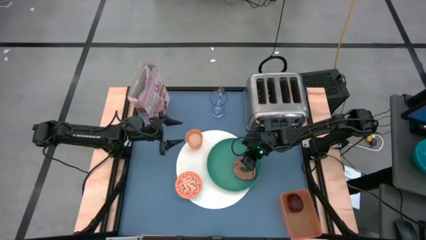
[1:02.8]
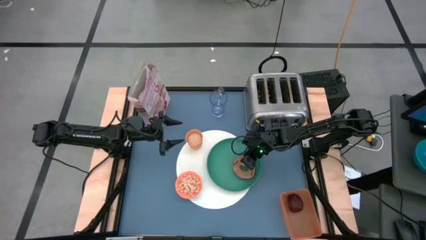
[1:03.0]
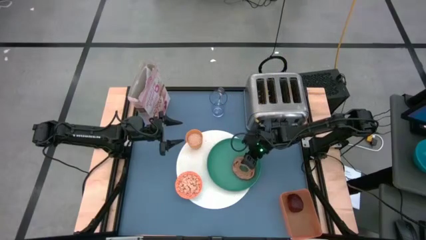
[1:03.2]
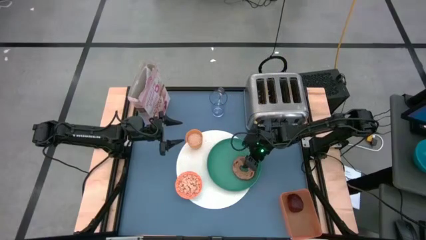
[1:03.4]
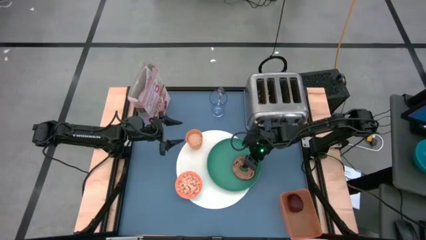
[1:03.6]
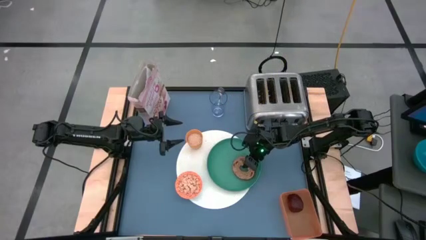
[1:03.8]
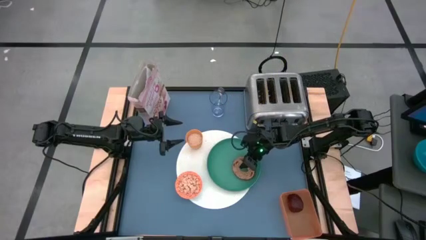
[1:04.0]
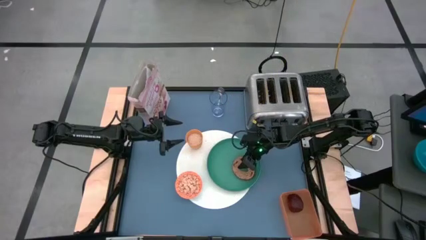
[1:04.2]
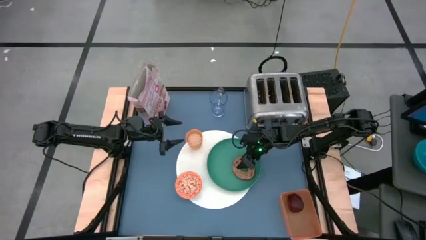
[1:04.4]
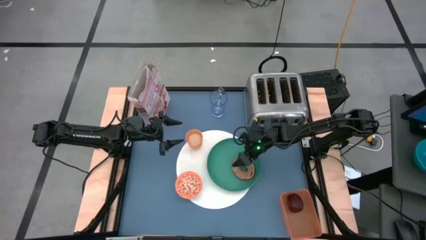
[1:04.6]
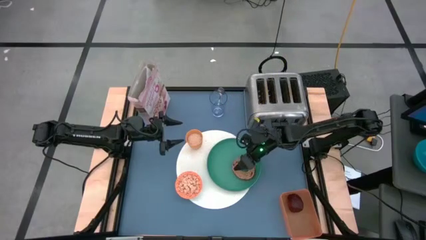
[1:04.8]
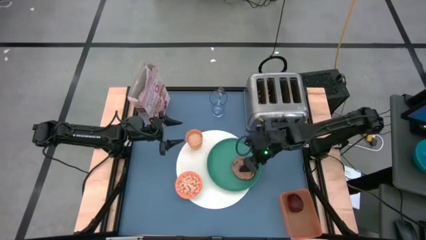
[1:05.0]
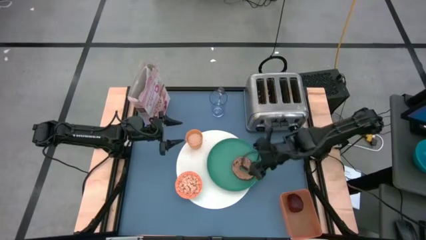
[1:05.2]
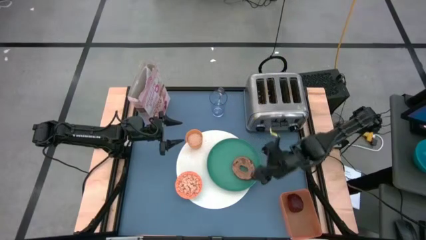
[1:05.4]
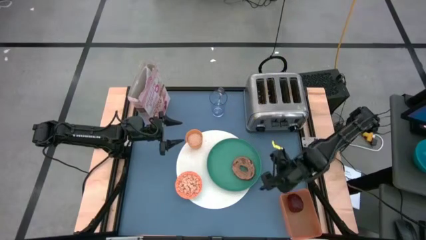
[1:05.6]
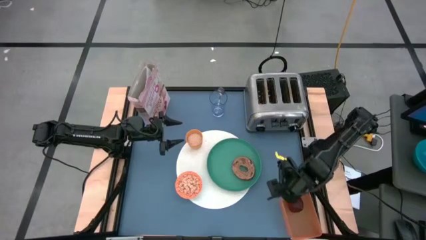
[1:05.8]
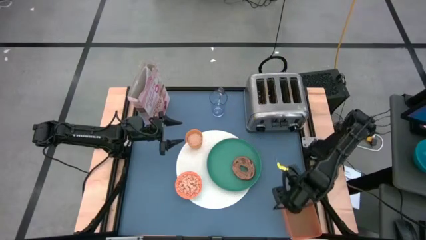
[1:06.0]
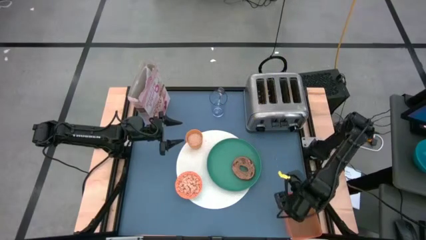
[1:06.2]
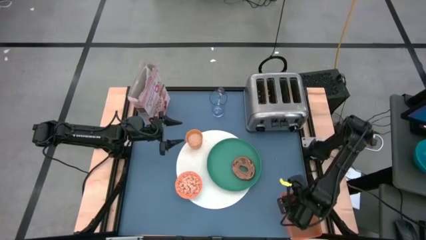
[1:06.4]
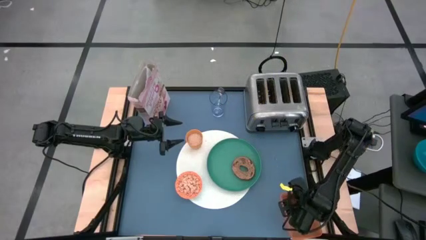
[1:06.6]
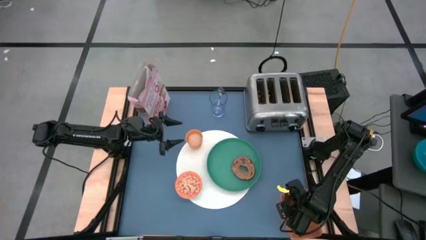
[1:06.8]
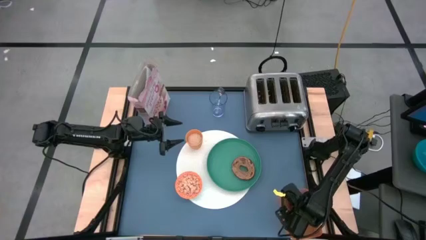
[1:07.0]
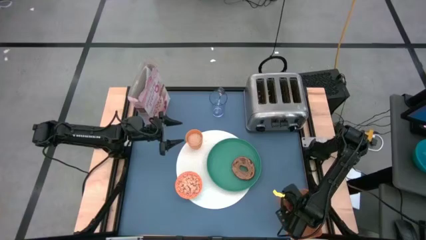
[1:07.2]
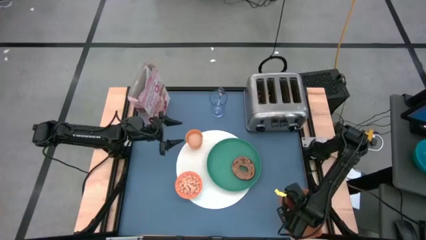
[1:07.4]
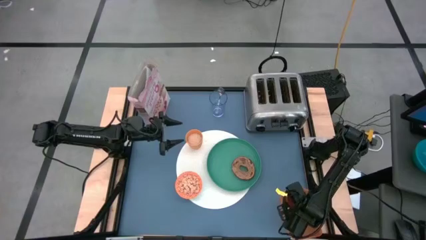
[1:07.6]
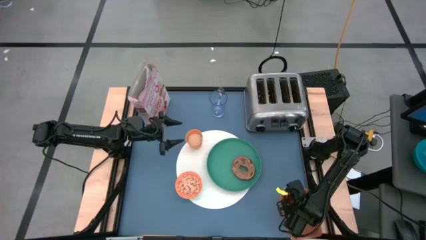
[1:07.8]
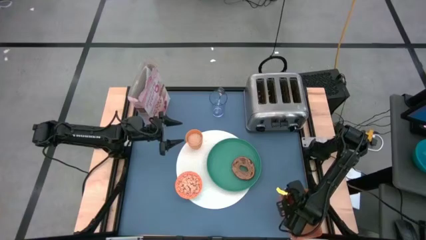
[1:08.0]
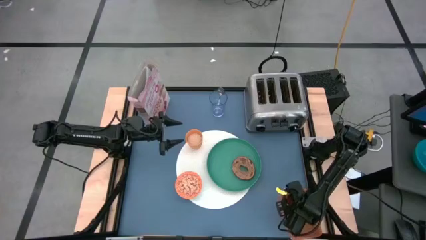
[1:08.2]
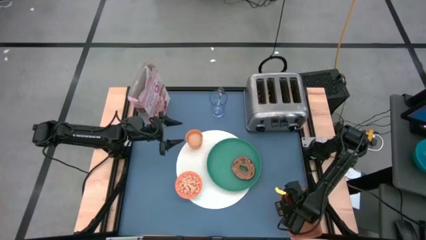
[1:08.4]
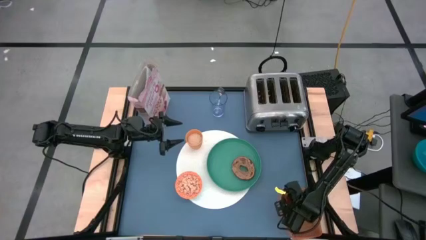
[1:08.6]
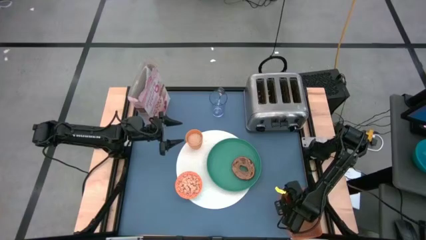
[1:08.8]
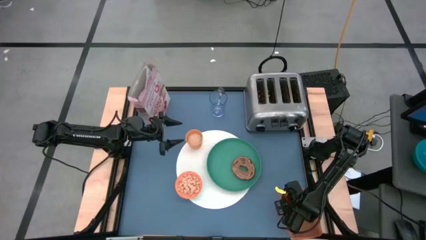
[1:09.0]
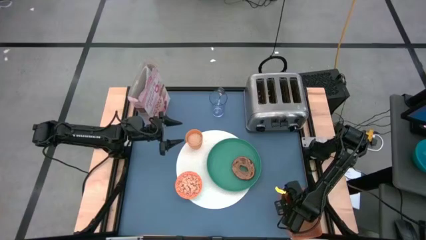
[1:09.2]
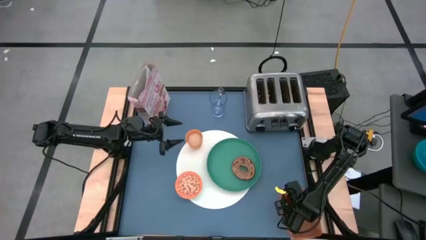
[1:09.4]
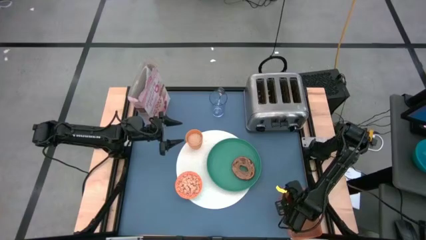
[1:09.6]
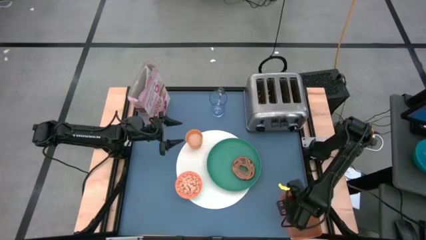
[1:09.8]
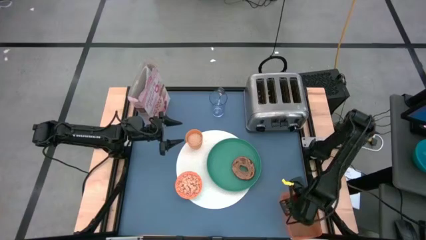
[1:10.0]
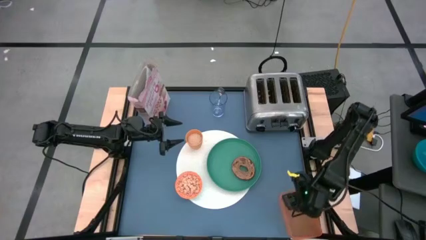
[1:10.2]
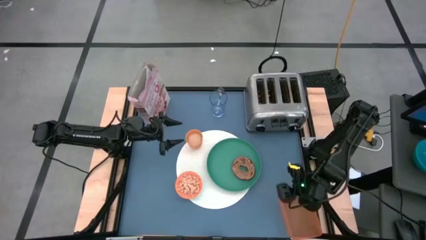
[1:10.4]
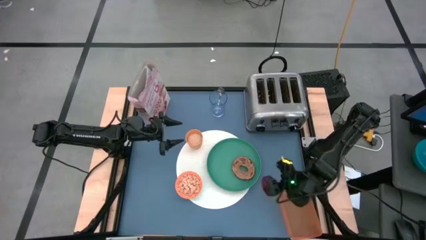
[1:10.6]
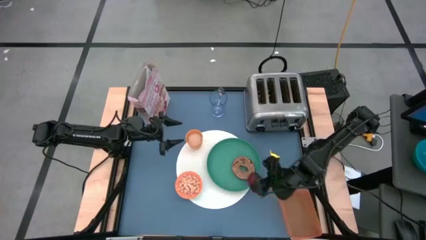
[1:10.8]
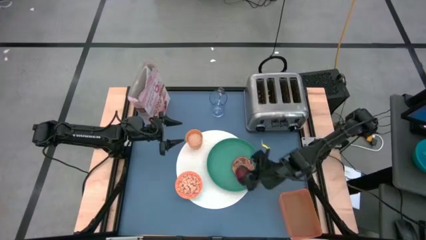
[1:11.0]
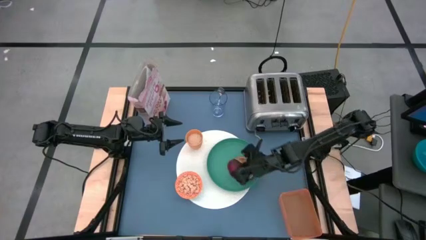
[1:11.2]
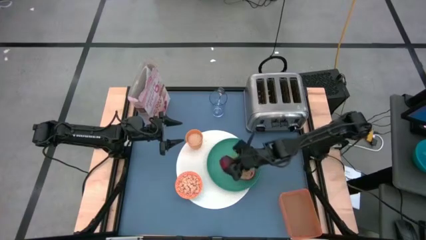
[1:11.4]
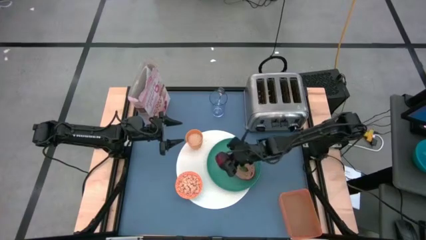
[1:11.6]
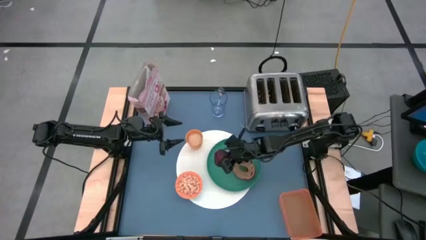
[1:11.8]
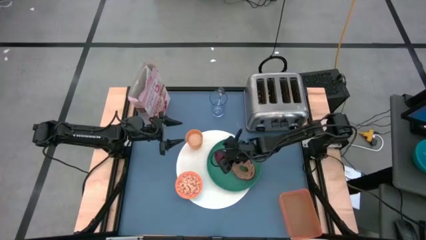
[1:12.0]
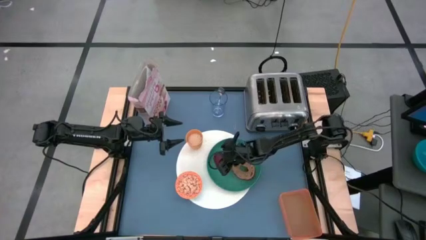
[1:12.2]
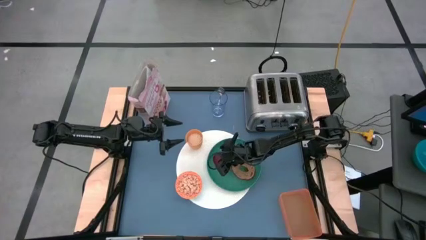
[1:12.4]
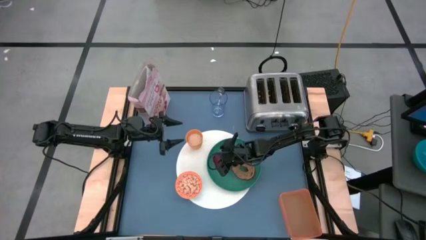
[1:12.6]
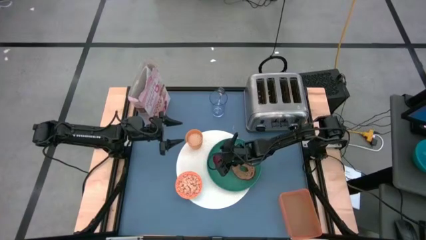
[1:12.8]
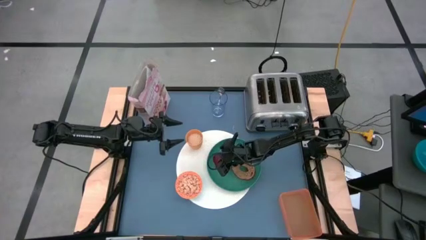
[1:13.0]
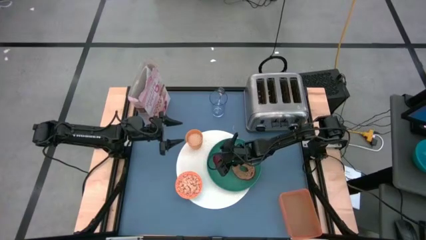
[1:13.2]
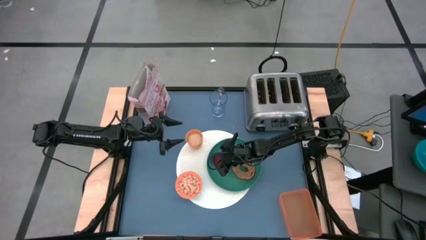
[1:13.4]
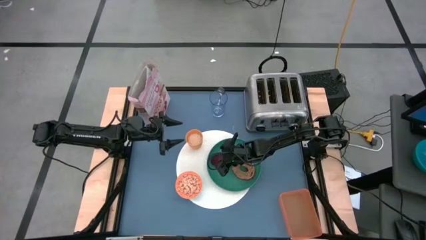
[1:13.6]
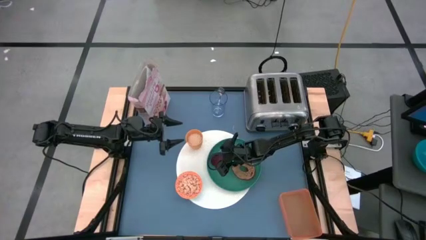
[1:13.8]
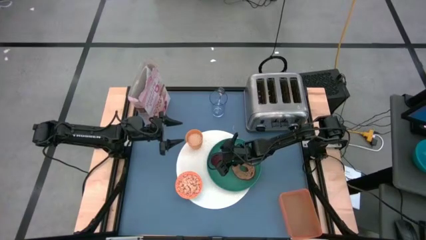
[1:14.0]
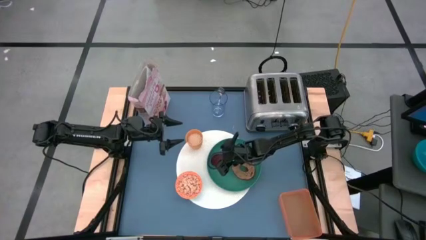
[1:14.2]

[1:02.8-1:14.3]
Task: Arrange a breakfast setting
Put the apple from the orange bin into the green plate

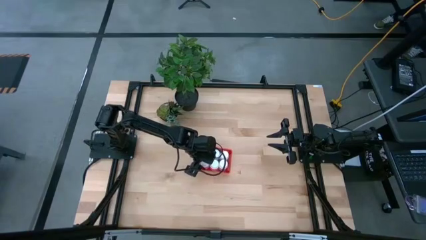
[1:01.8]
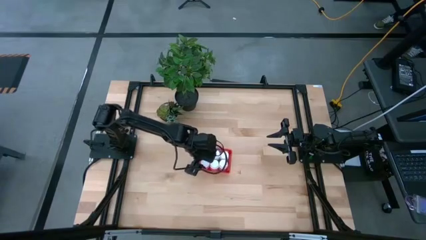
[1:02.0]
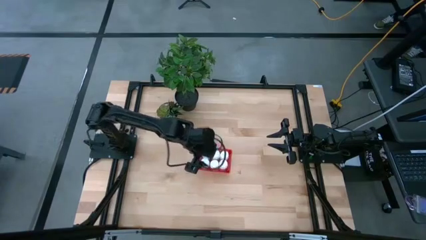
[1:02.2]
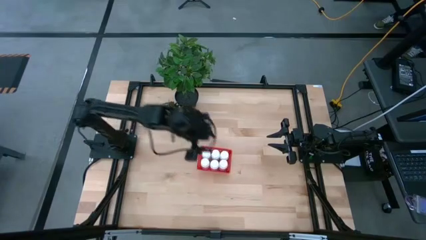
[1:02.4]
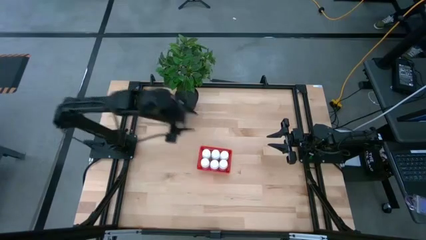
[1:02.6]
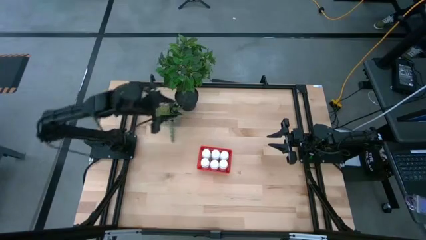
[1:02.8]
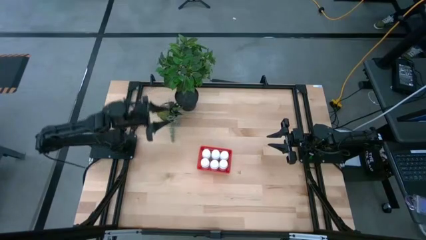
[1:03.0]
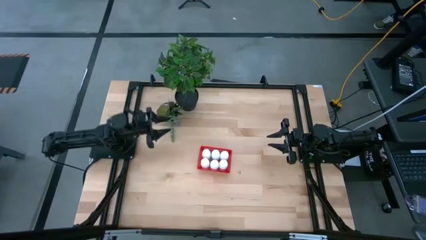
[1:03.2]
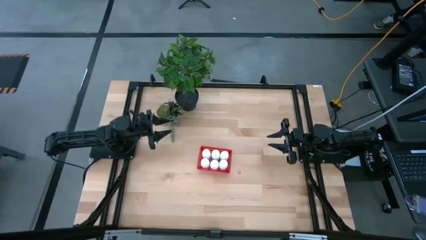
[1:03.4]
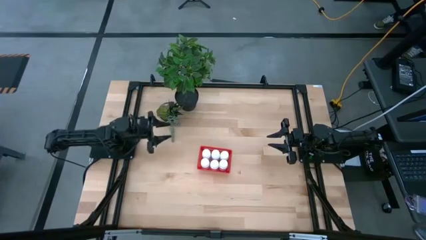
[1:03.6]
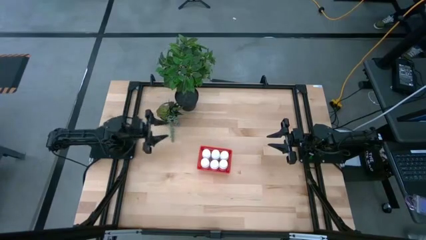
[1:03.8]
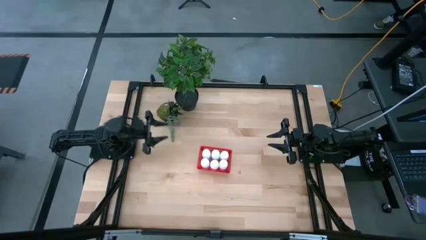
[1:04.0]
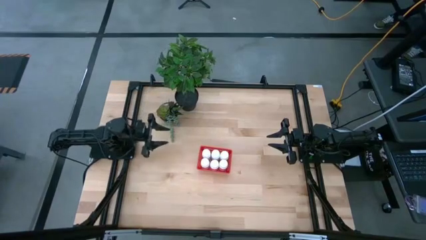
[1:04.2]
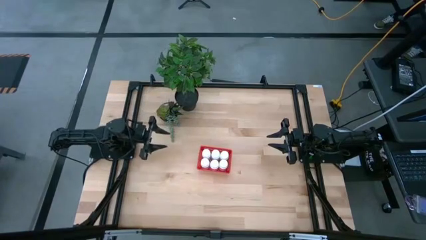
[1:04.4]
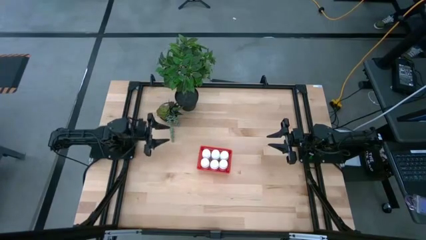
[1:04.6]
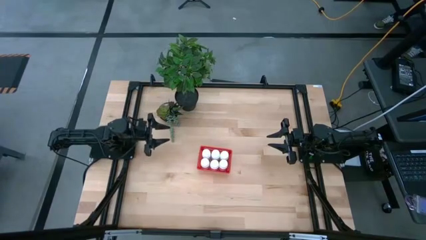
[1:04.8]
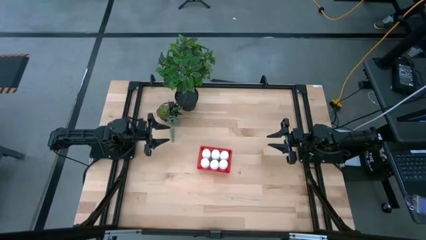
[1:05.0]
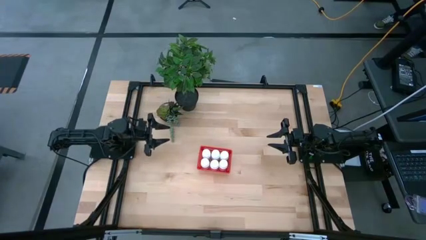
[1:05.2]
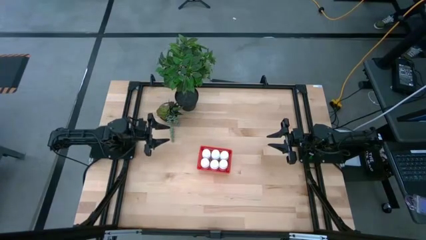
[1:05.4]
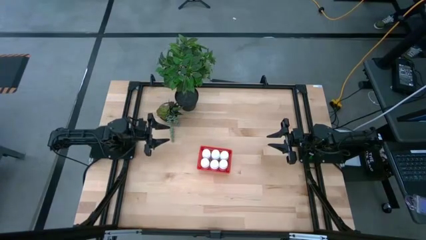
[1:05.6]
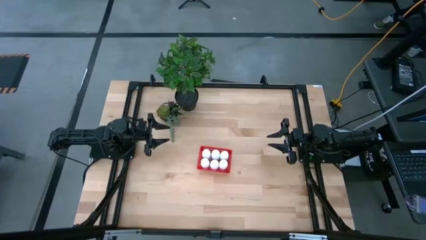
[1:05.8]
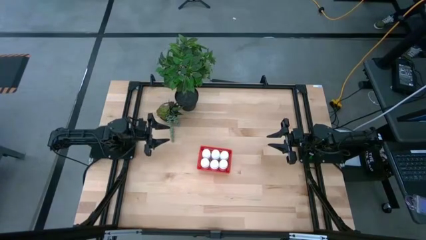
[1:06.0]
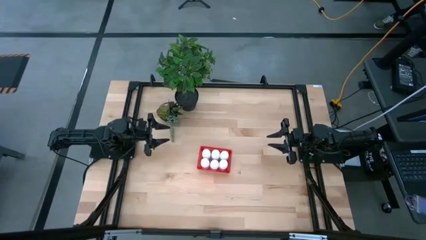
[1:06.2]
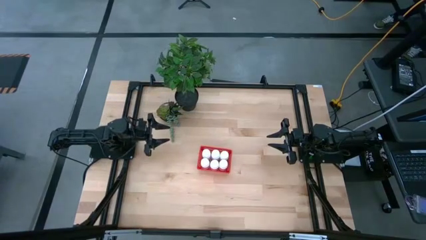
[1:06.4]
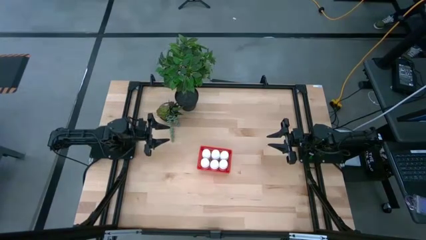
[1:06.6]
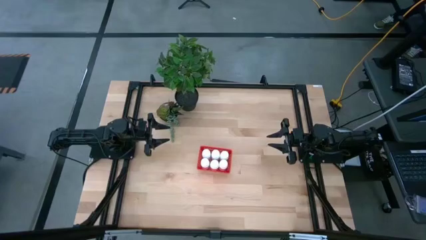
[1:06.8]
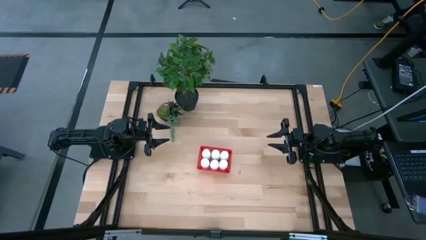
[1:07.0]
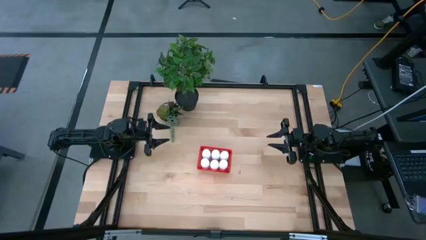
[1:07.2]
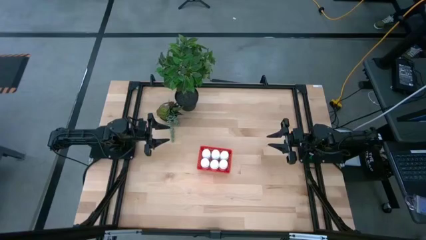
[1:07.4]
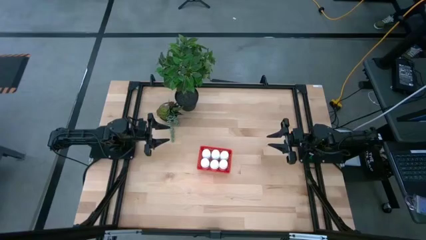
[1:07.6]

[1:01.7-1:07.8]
Task: Pick and place pill bottles into a basket
Return to Home Position
